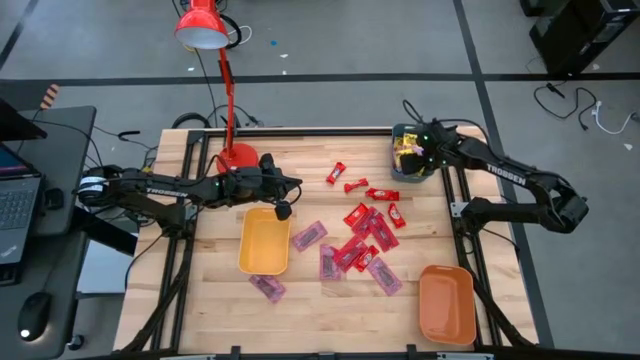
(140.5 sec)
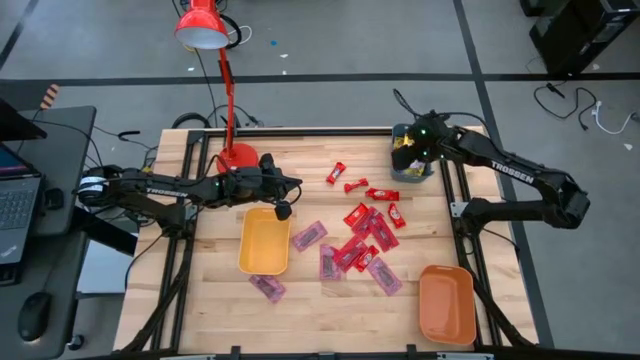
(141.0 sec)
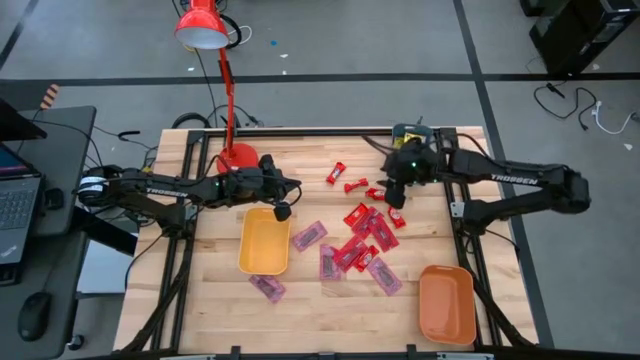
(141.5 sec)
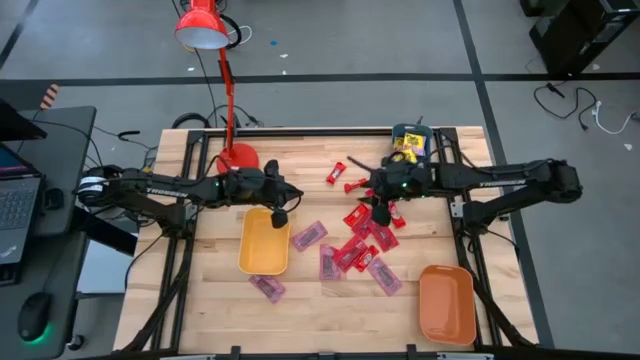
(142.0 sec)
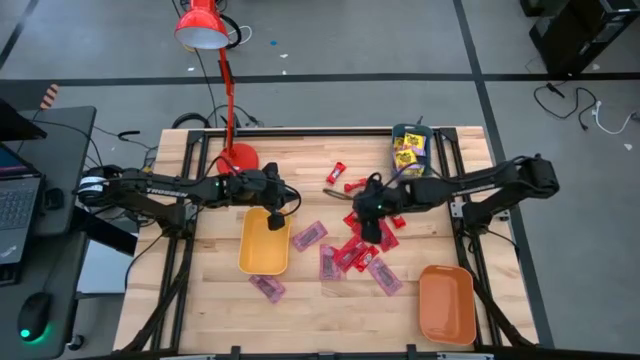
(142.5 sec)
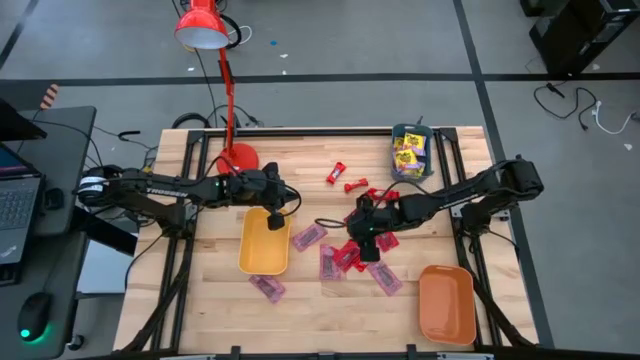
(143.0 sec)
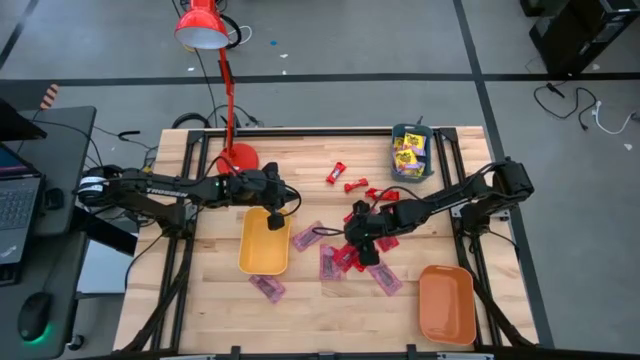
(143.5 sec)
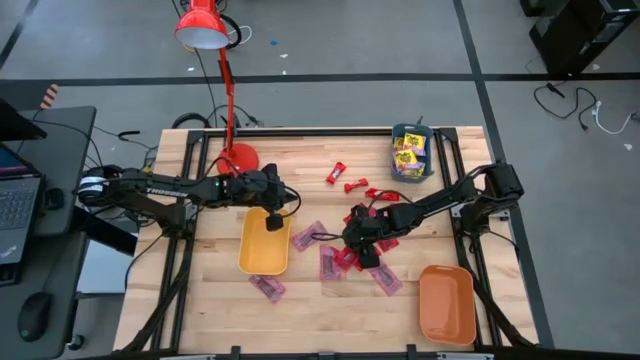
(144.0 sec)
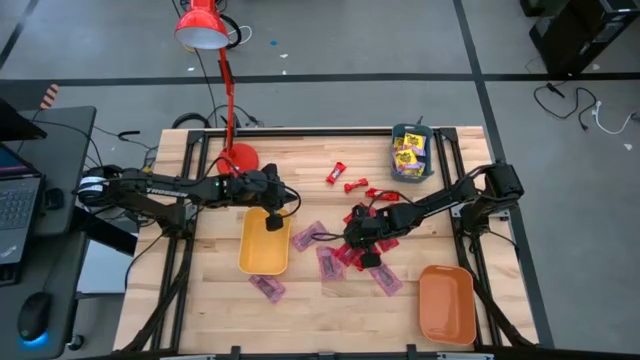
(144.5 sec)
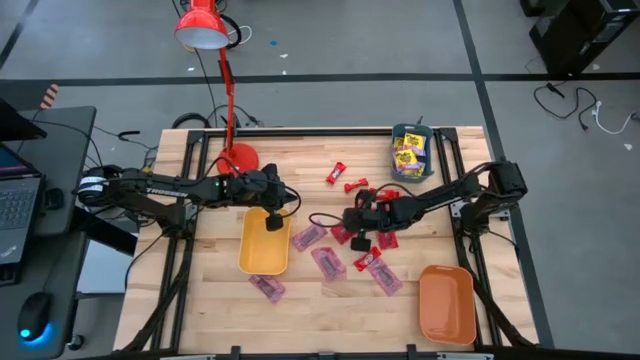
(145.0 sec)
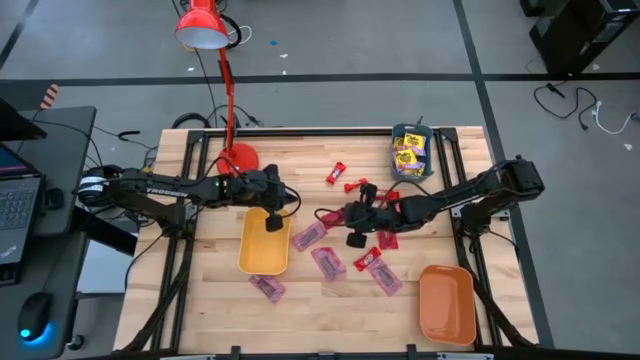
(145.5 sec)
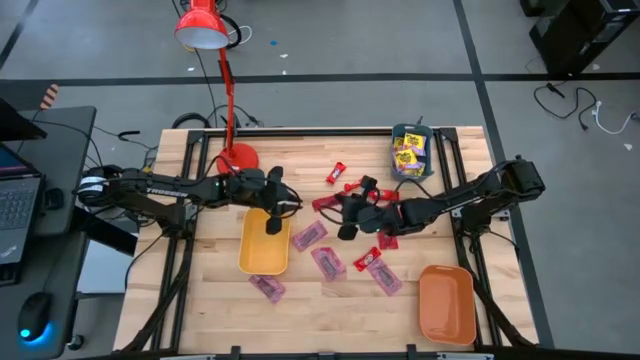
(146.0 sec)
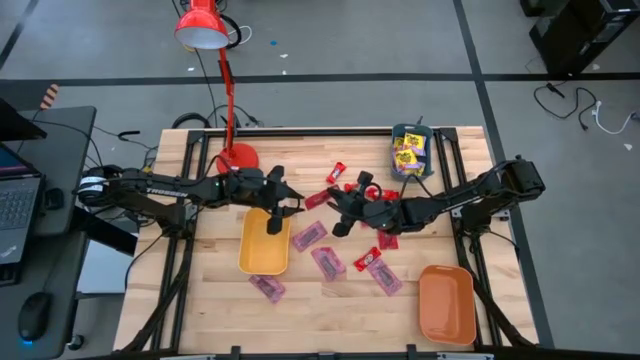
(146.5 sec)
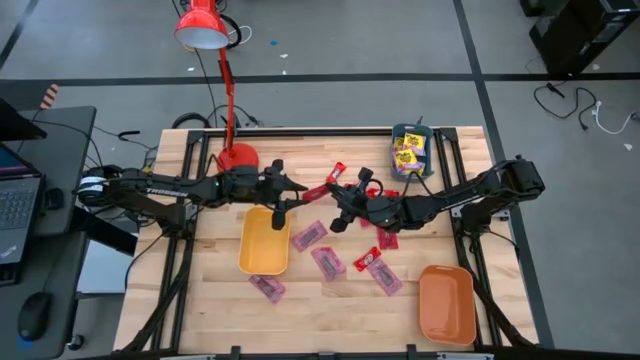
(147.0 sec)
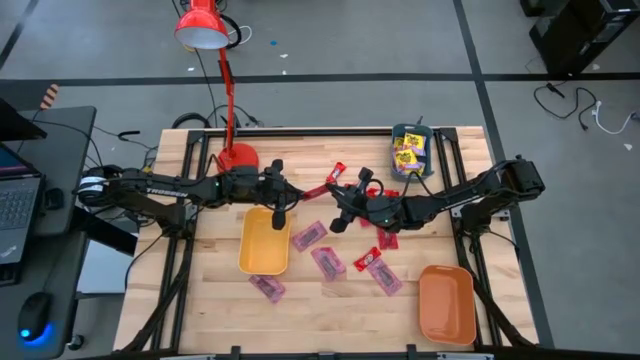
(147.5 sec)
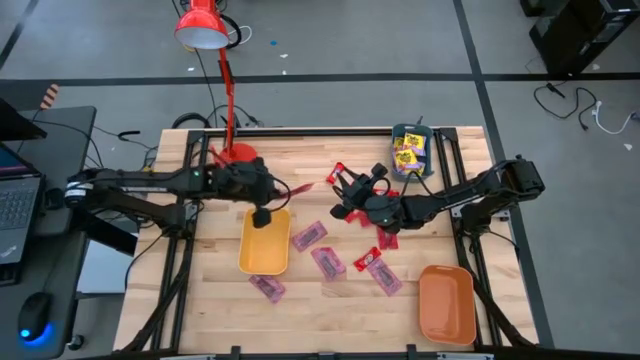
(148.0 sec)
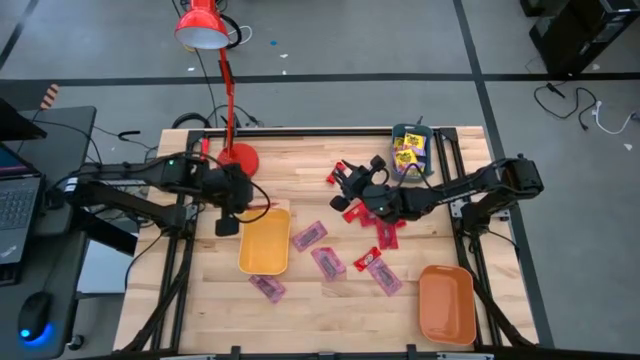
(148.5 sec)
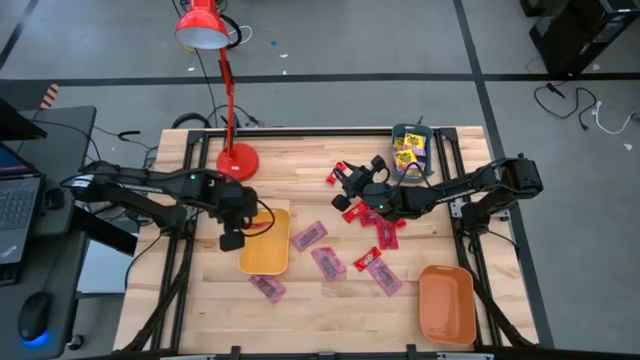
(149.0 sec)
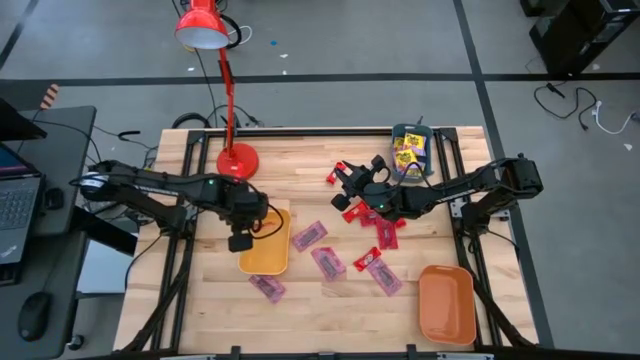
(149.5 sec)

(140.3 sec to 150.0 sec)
Task: Sort candy
Put the red candy pack into the yellow bin

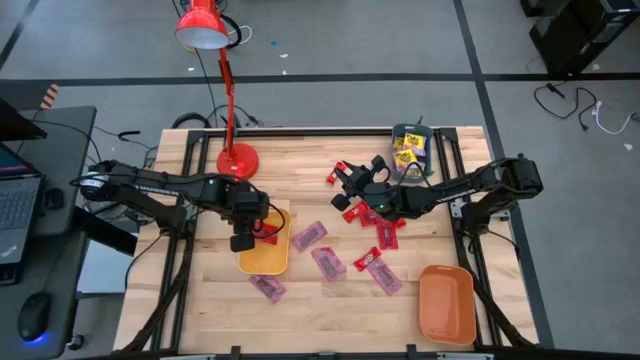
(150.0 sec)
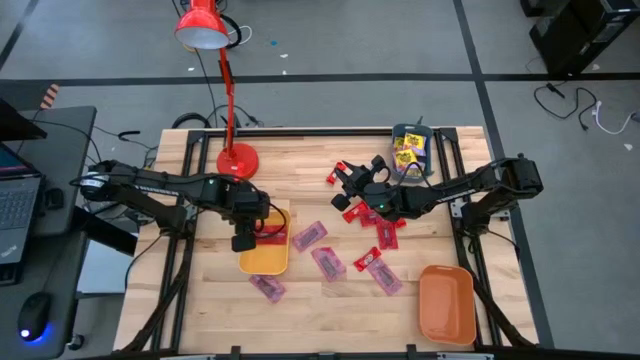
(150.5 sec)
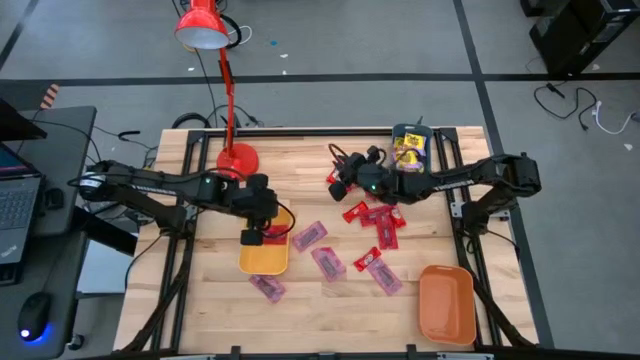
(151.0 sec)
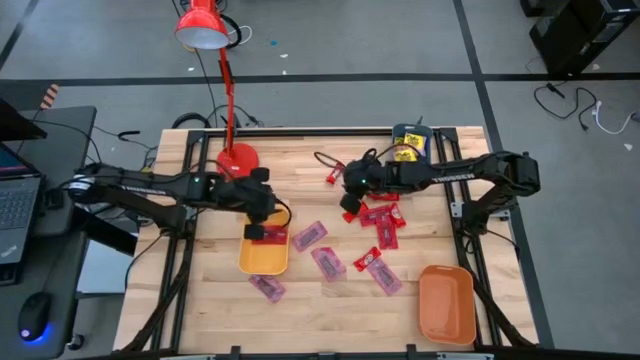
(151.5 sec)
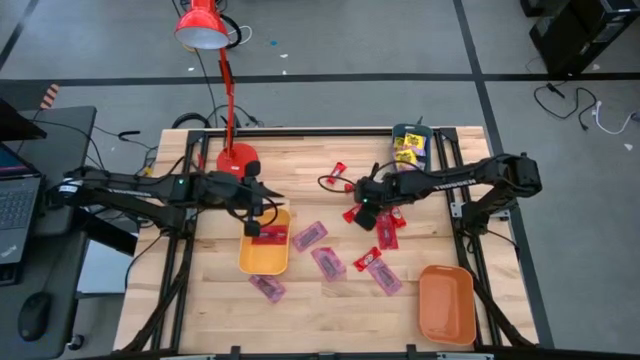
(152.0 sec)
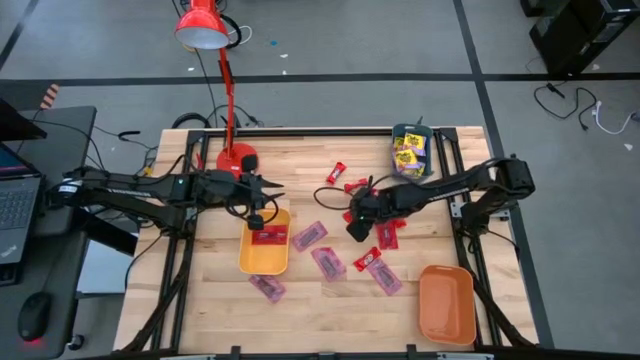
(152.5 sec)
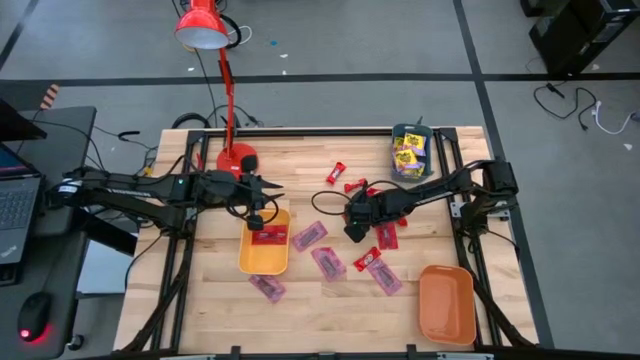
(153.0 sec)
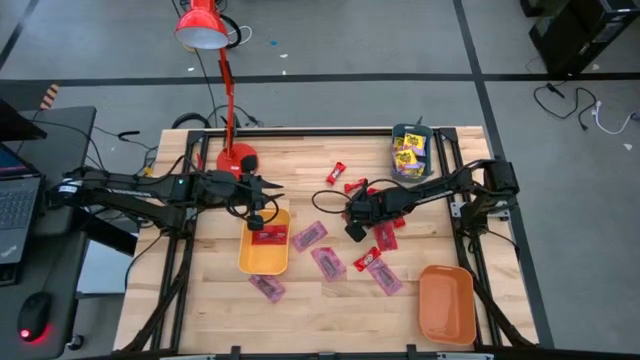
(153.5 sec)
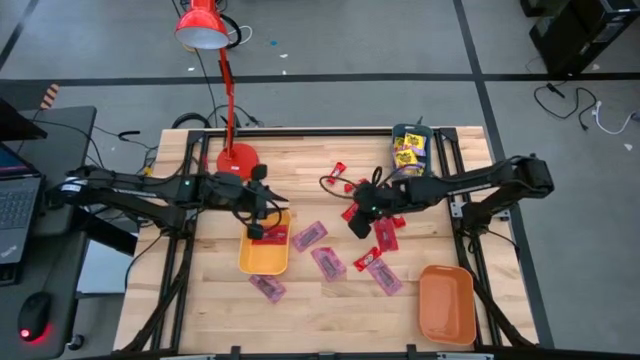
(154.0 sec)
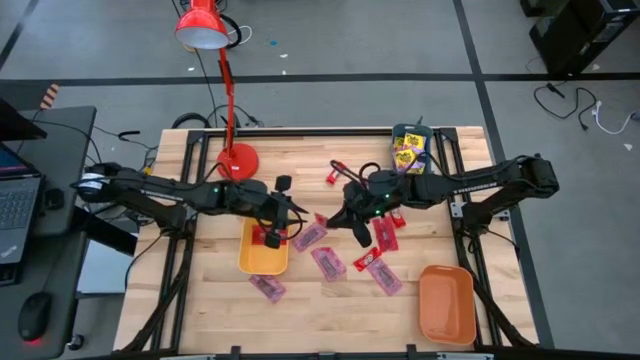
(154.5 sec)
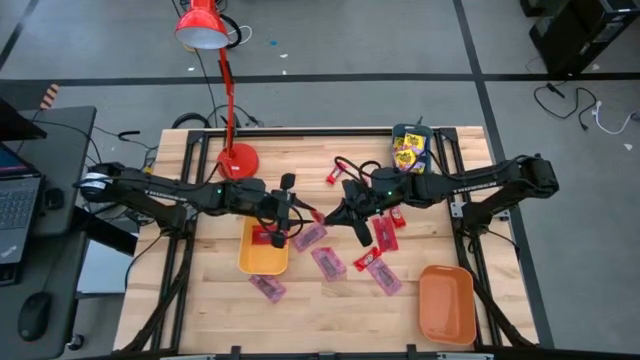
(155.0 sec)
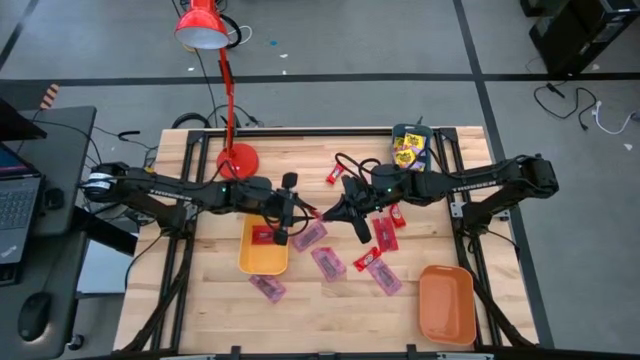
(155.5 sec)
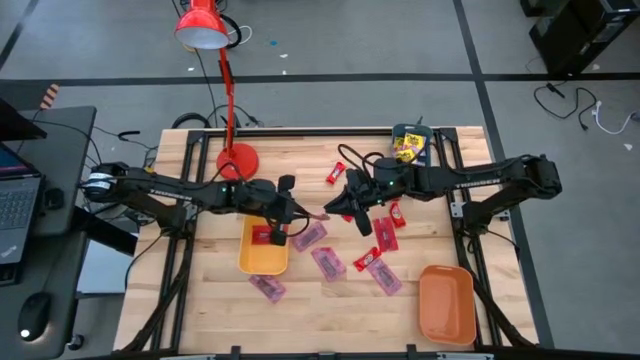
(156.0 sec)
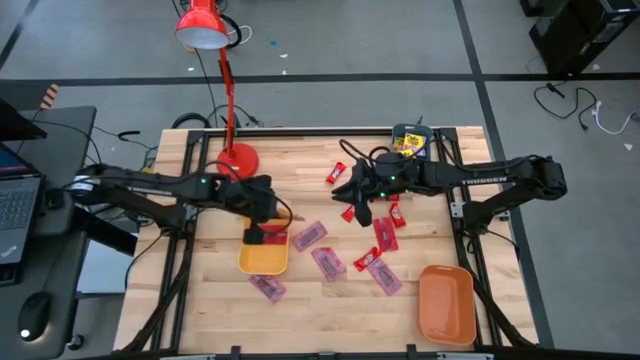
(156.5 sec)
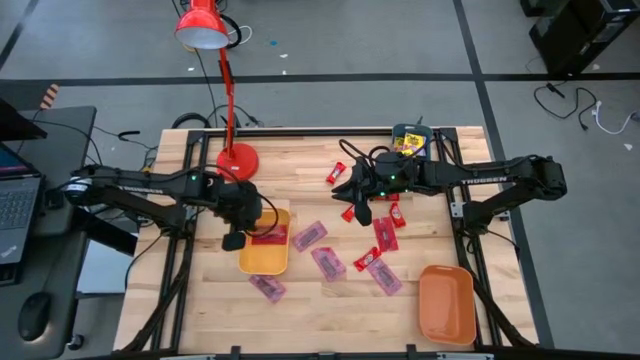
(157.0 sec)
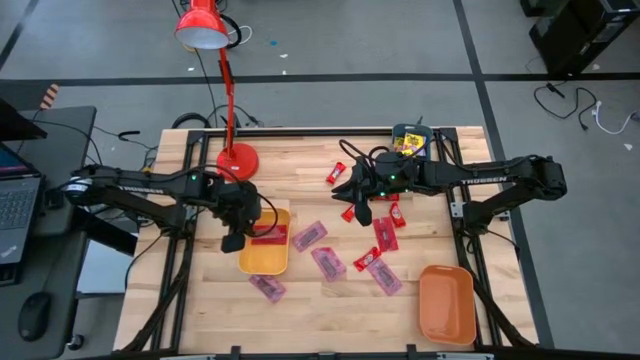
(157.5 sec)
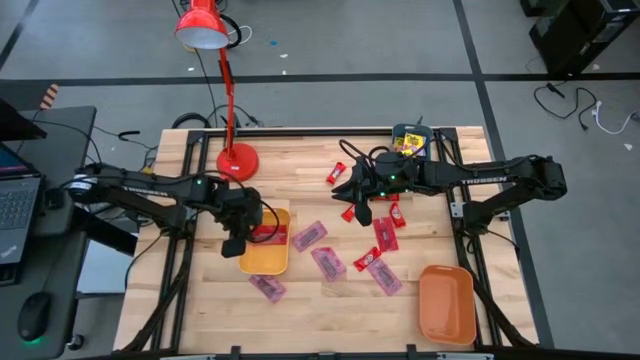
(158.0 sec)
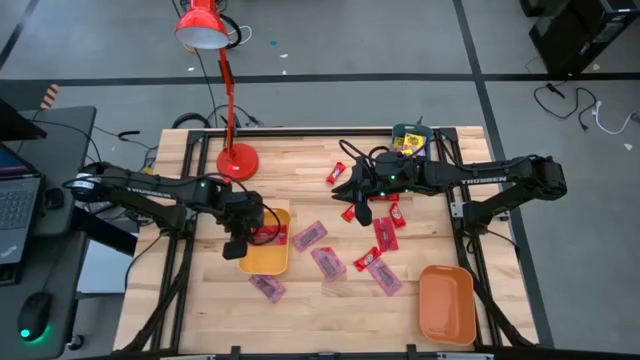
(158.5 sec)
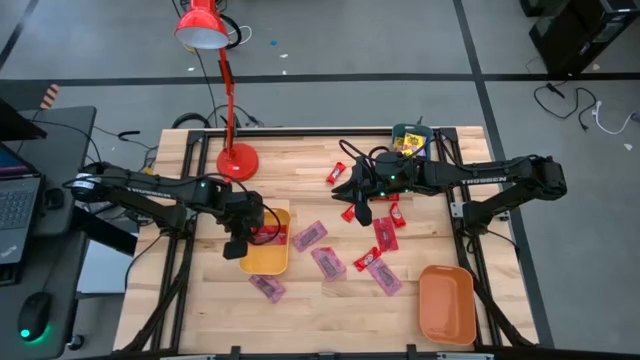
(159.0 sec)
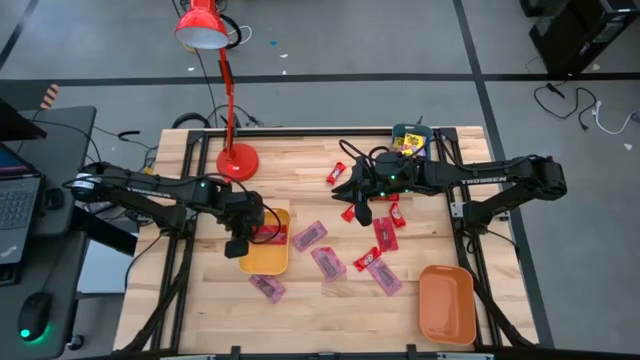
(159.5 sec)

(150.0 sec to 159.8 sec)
Put the red candy pack into the yellow bin

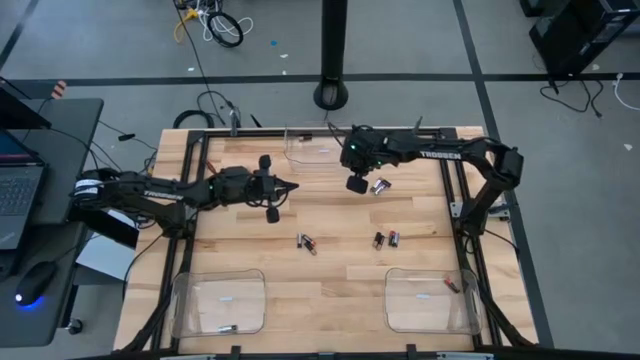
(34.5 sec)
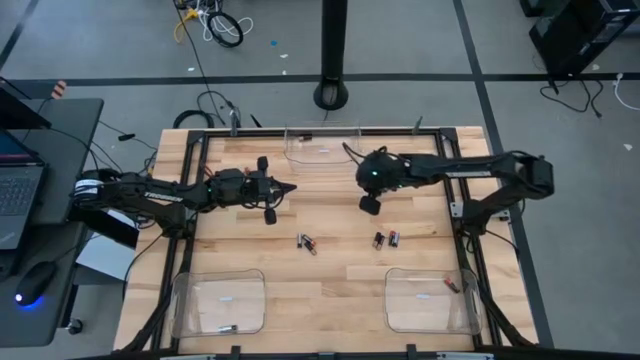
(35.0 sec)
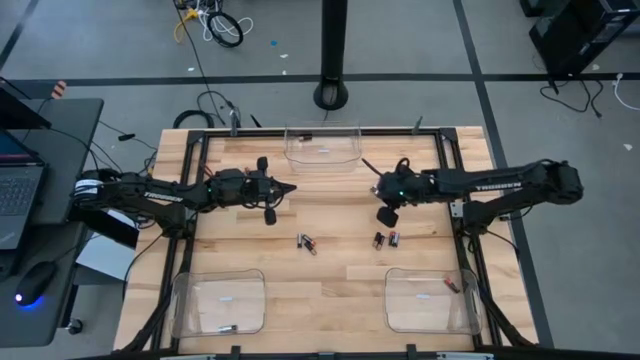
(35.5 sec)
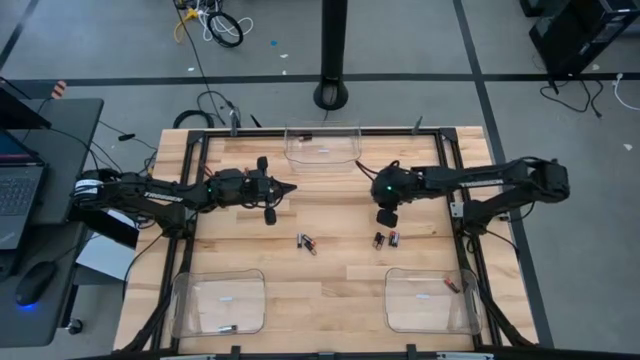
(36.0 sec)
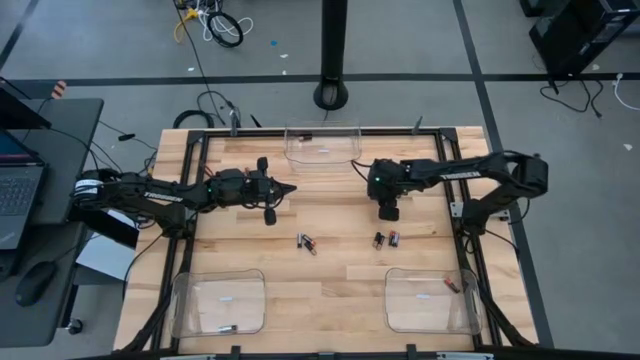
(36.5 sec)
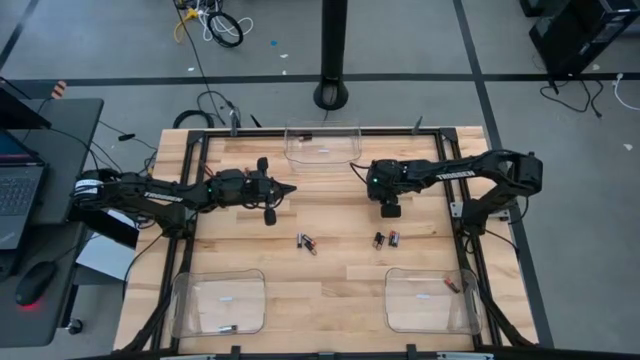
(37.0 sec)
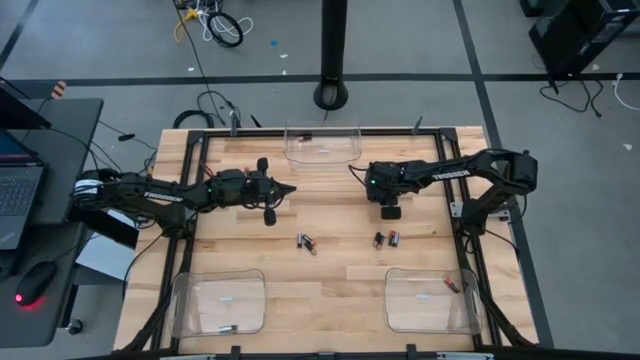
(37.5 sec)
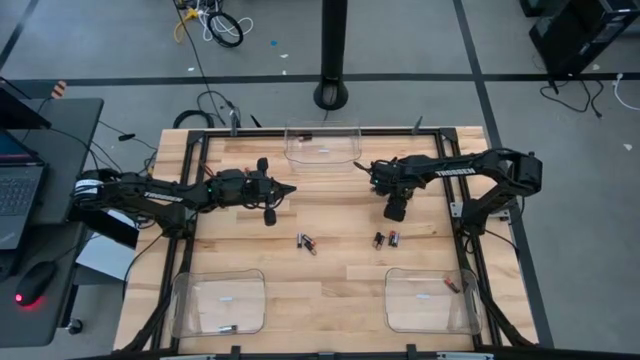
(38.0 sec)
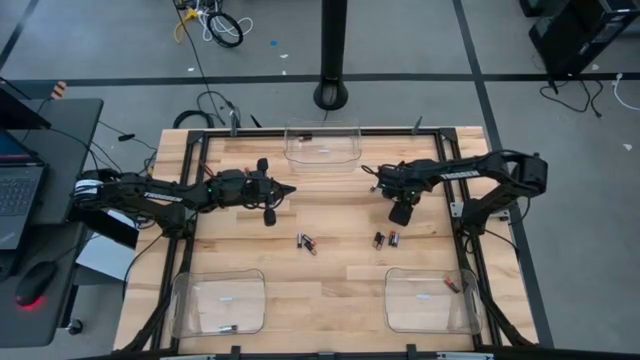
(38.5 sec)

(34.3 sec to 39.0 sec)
Task: Sort batteries
Put the silver battery into the left bottom transparent bin
